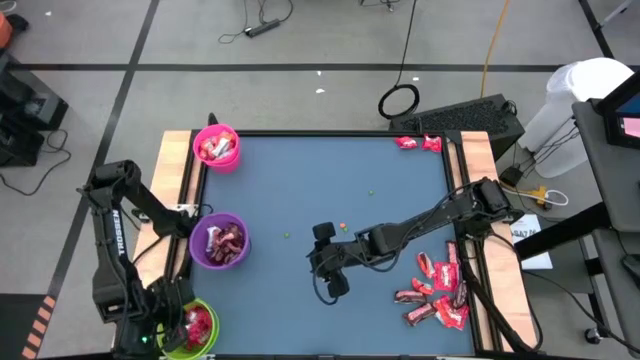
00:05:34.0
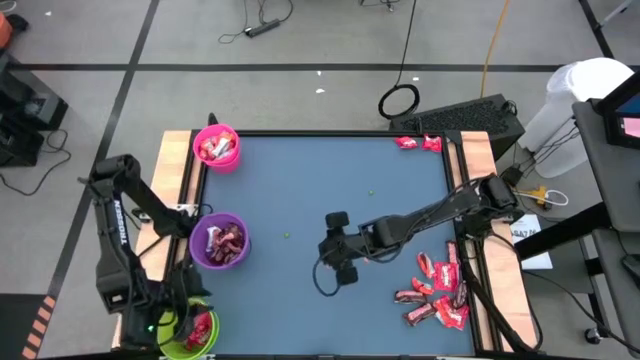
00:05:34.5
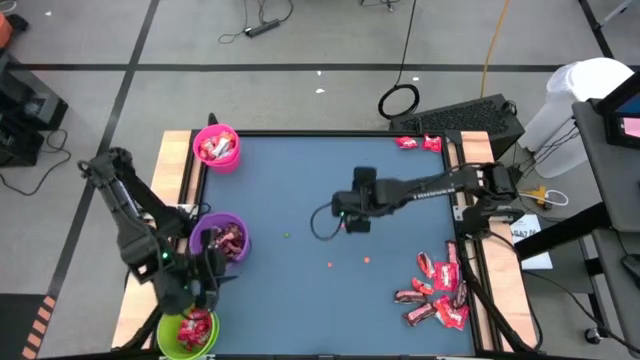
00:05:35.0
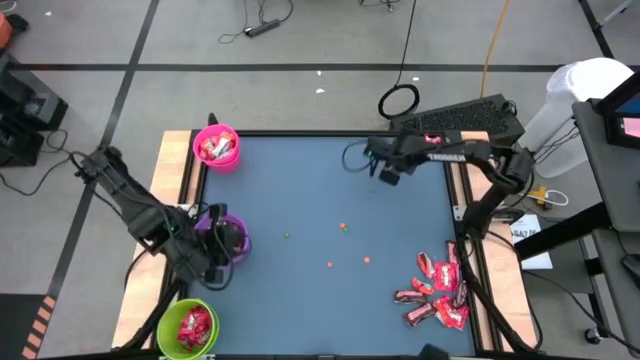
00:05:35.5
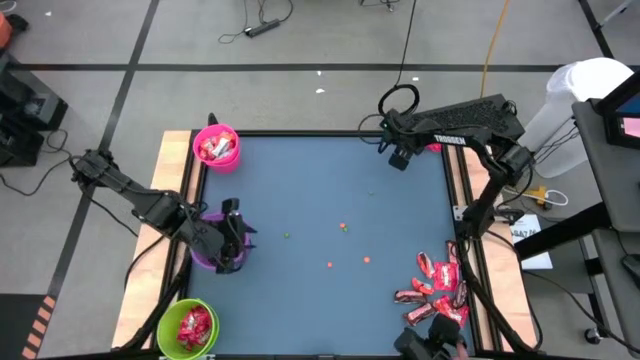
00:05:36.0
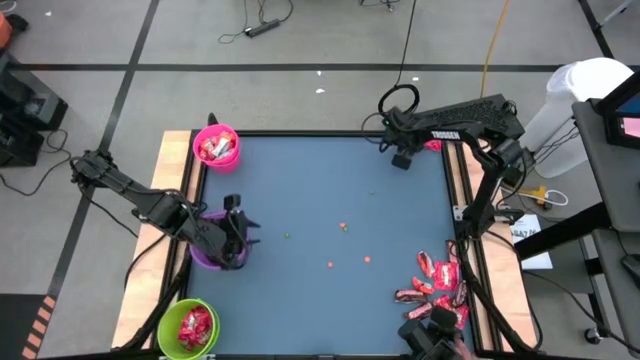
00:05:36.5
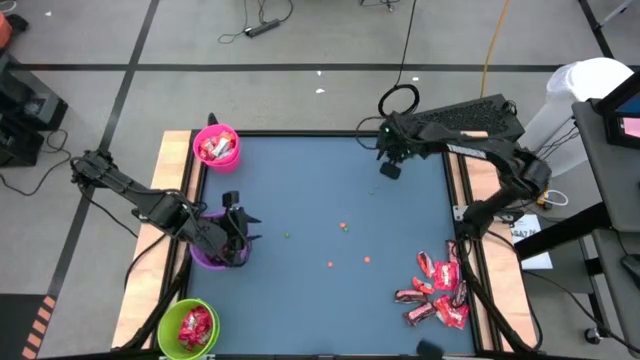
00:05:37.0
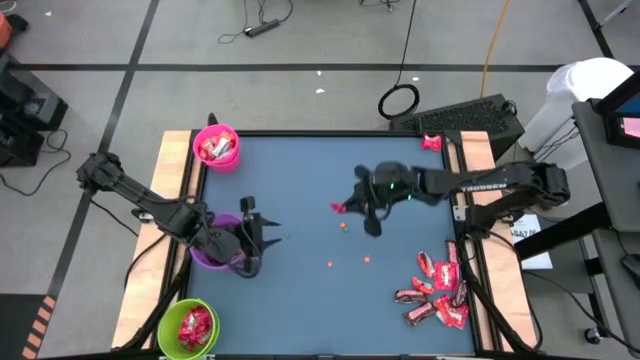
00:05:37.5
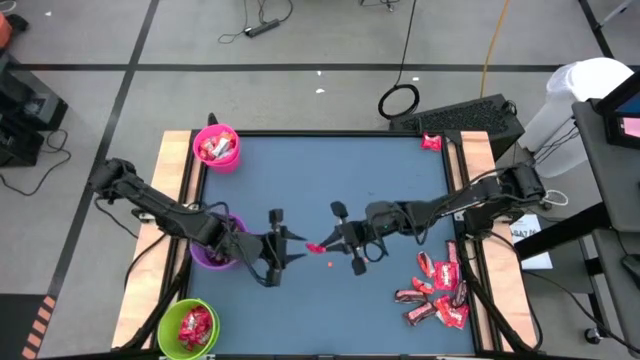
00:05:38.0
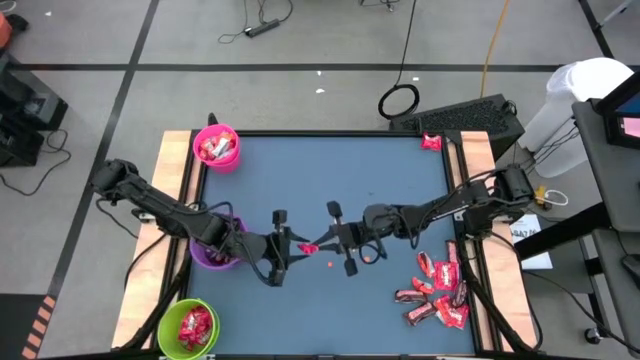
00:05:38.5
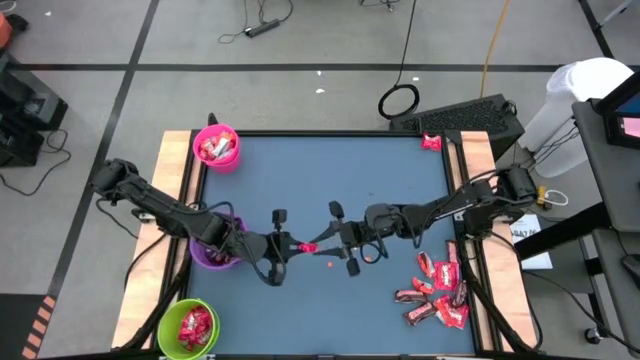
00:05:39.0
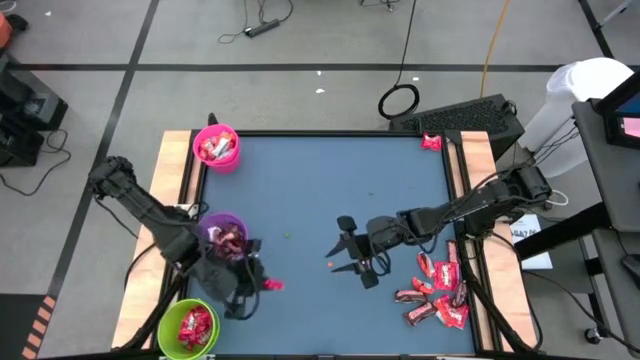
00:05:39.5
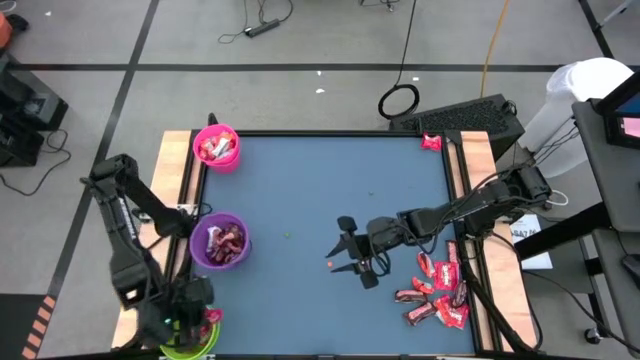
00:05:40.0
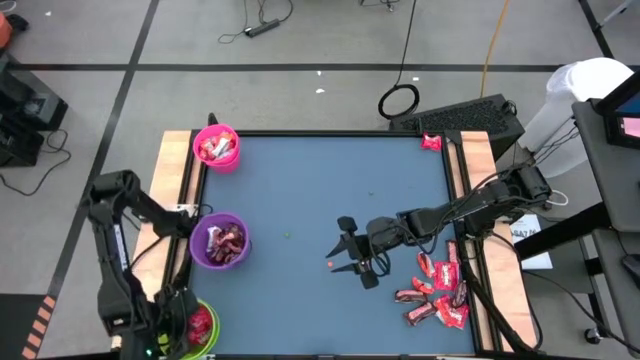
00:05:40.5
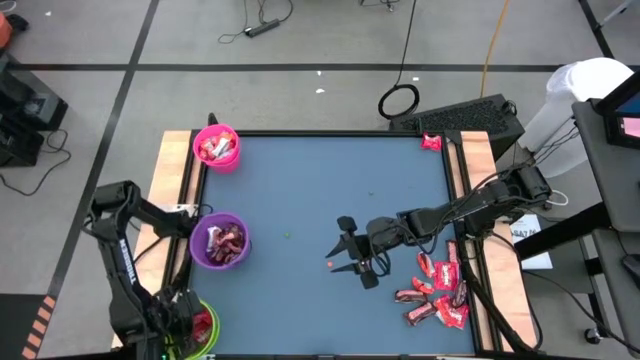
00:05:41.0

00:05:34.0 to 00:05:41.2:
Task: Organize candy in baskets
Put the red candy into the green bucket

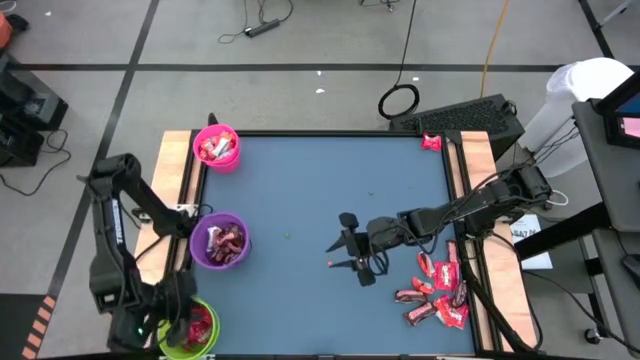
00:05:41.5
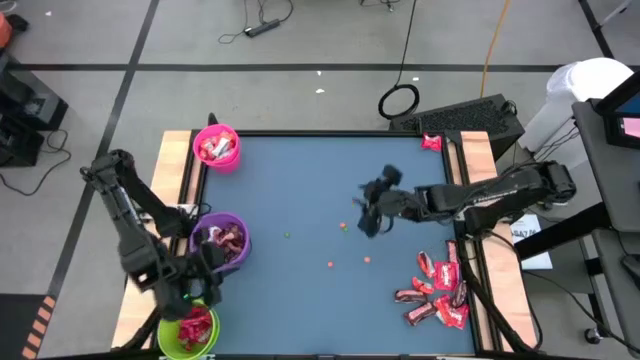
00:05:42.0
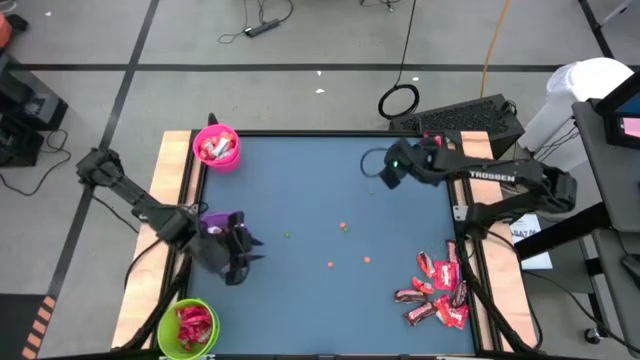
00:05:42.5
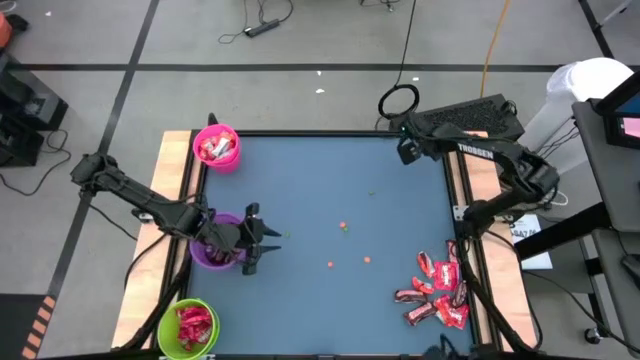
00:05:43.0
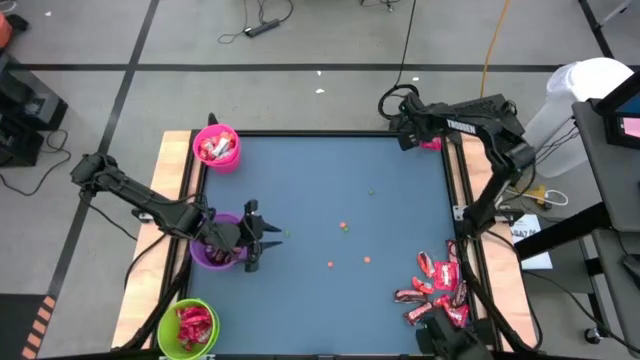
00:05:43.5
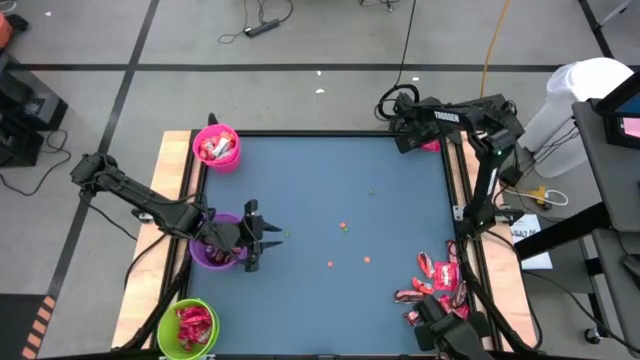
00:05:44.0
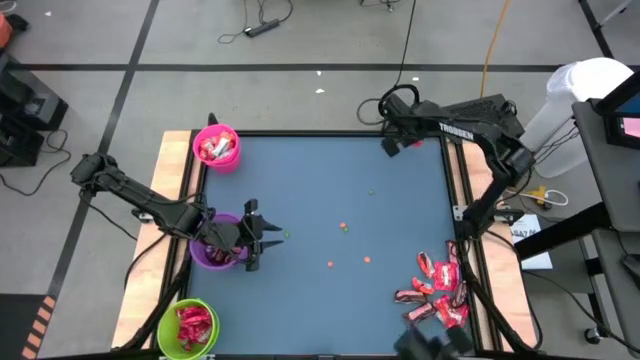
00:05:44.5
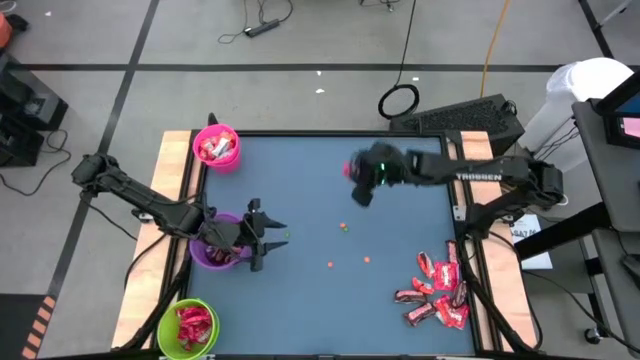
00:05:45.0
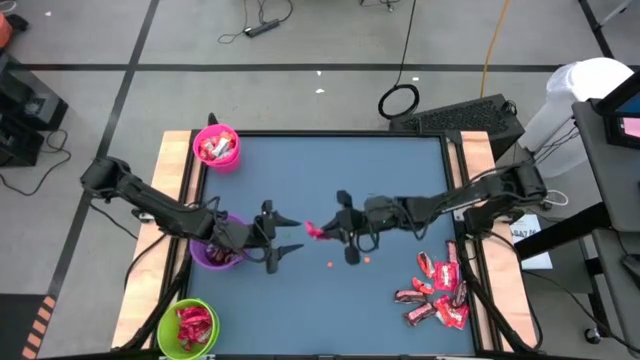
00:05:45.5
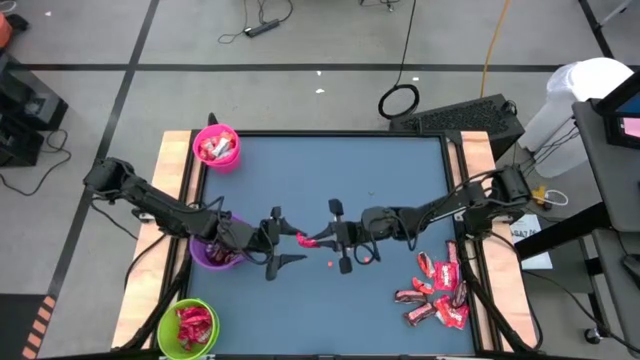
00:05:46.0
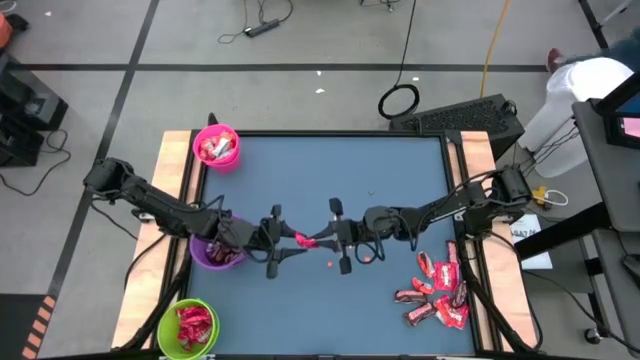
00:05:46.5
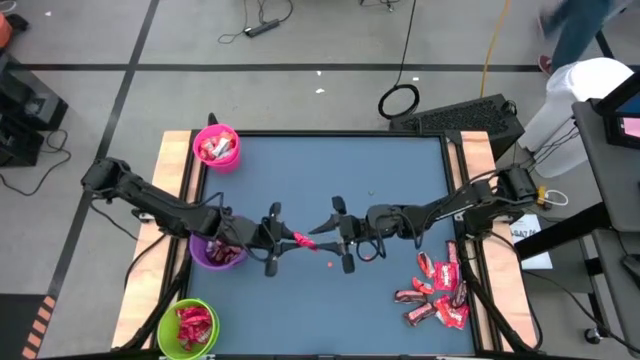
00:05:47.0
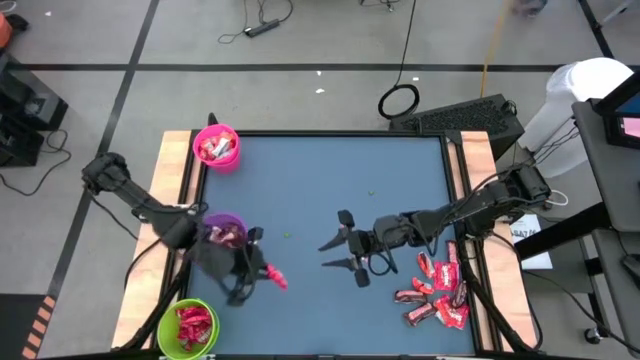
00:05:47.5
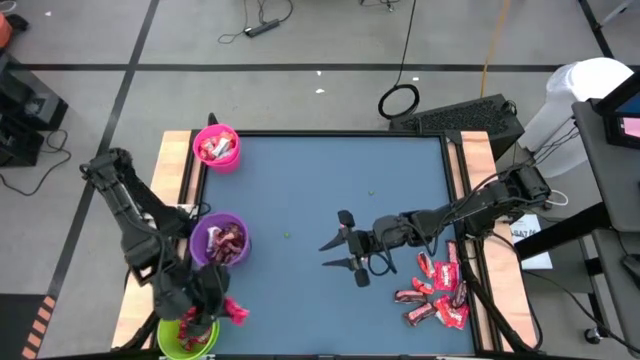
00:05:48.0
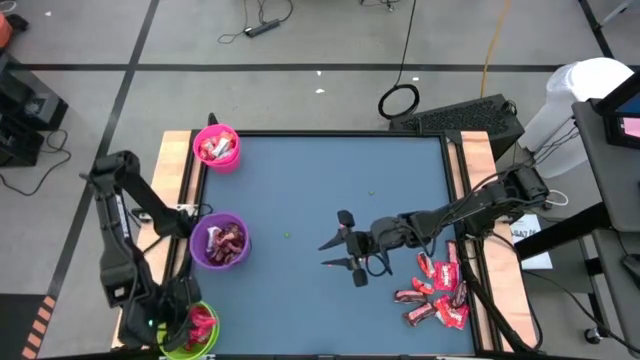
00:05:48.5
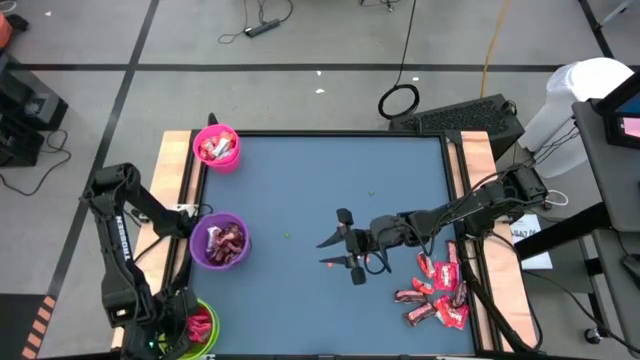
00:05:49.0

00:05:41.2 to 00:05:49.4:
Put the red candy into the green bucket

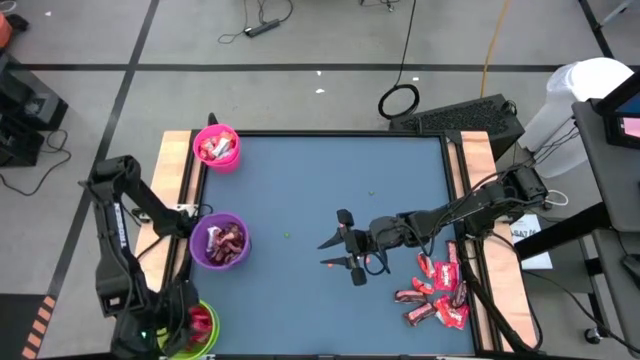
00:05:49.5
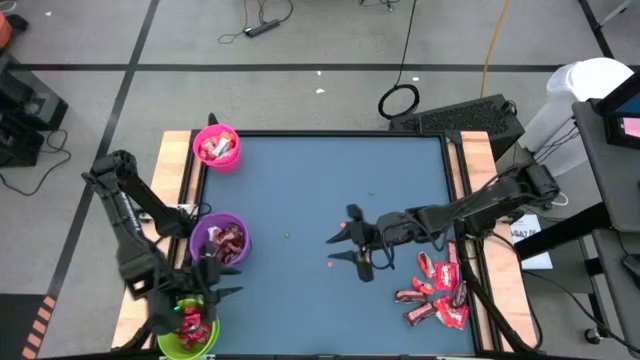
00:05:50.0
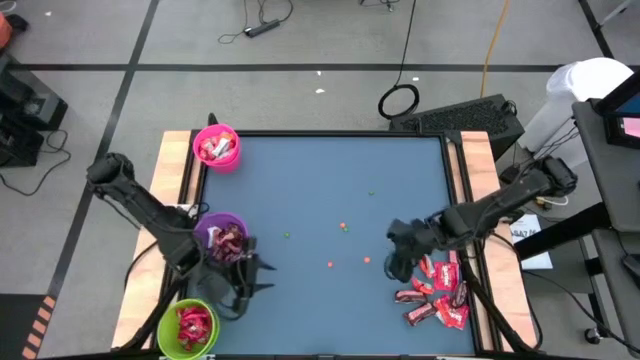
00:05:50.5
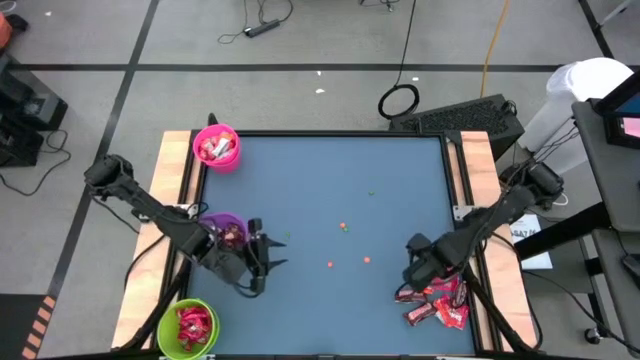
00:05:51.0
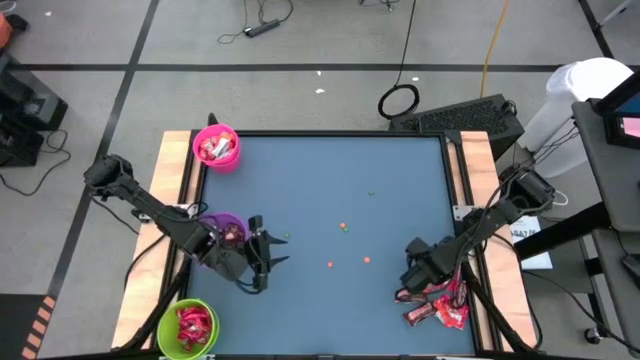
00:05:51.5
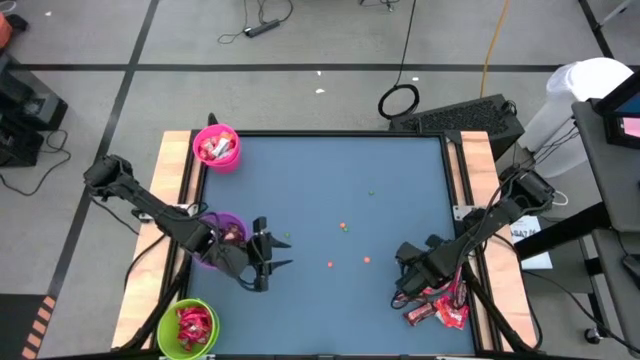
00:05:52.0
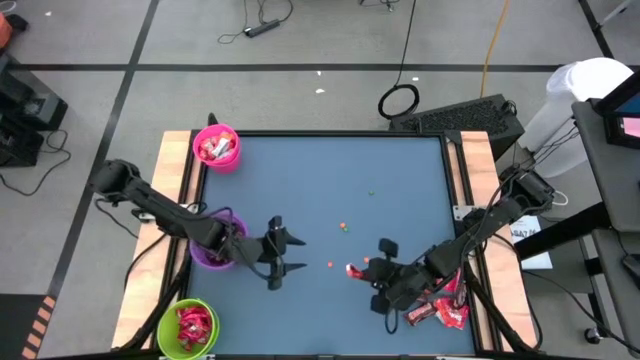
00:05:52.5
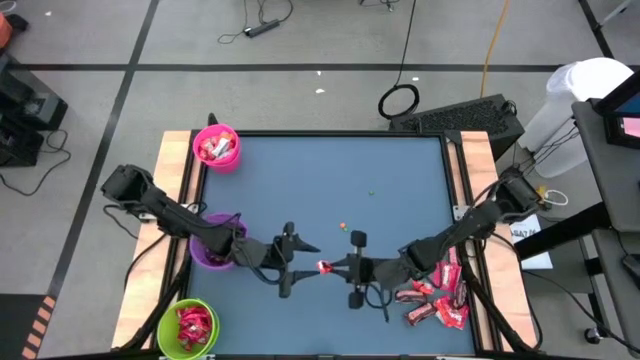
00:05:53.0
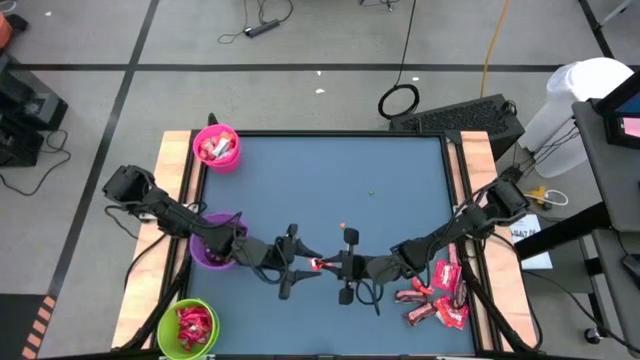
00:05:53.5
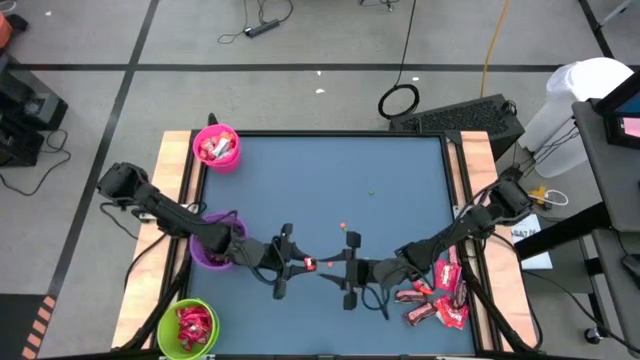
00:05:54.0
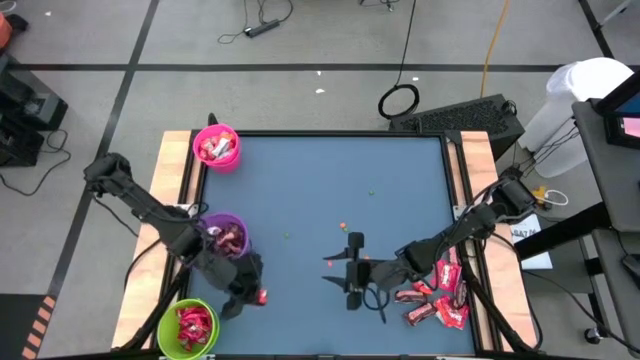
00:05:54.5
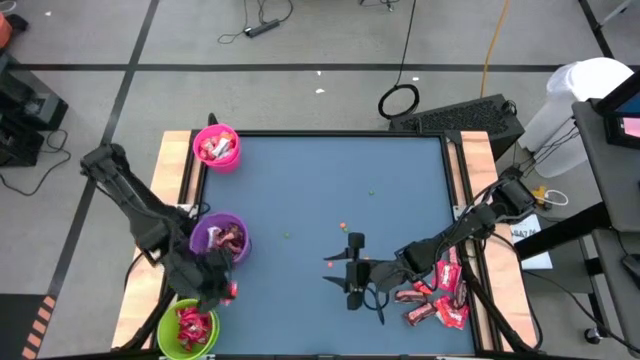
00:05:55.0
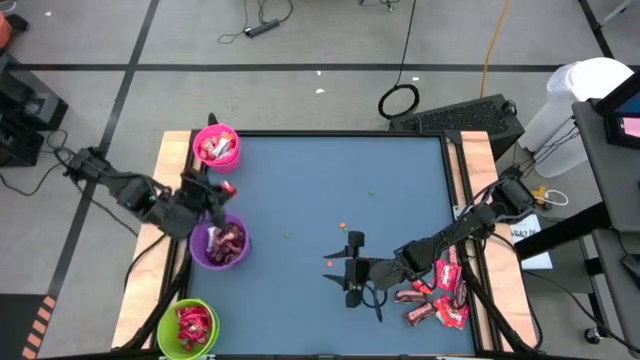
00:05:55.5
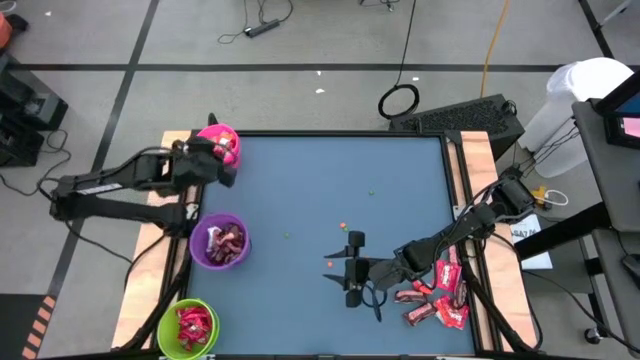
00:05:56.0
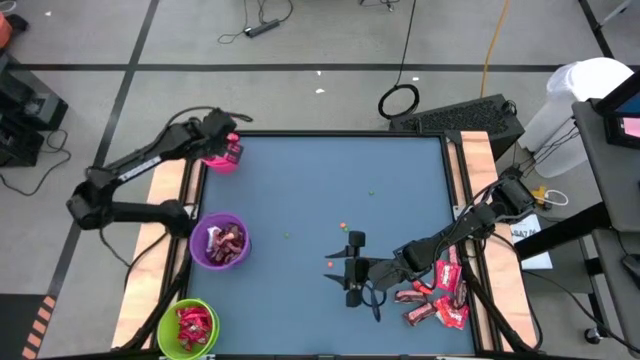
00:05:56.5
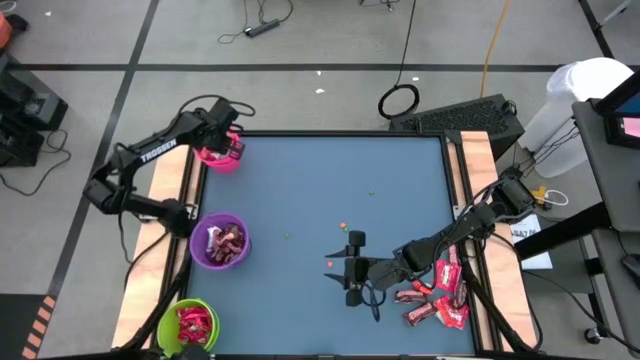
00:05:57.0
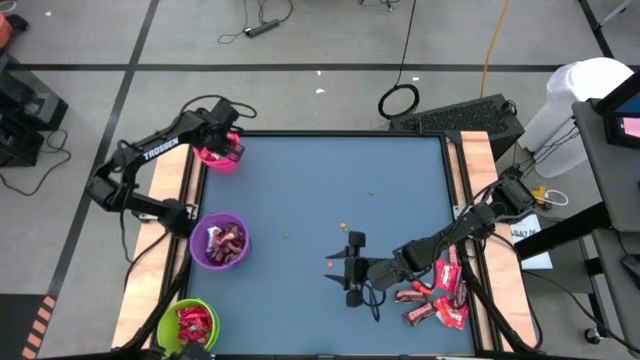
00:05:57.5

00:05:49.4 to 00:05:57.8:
Put the orange chocolate into the pink bucket
